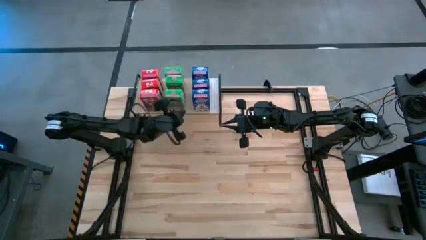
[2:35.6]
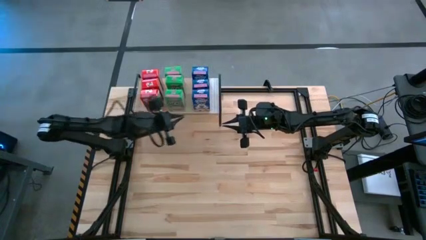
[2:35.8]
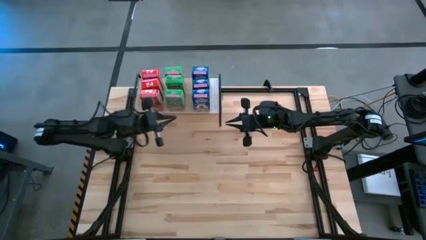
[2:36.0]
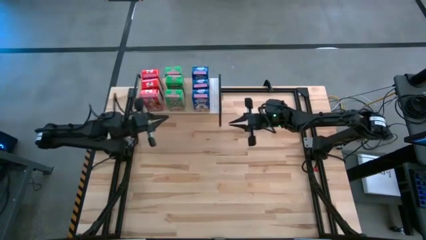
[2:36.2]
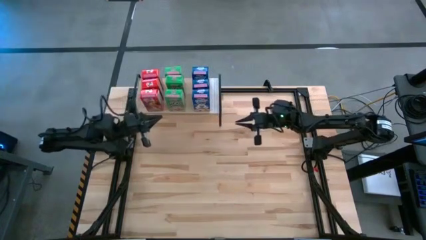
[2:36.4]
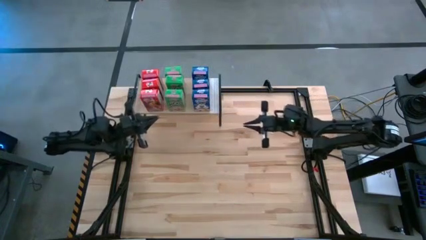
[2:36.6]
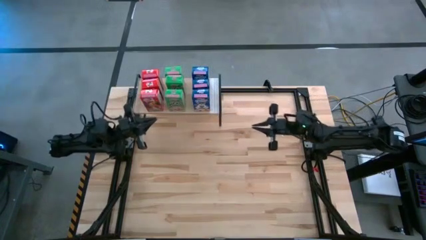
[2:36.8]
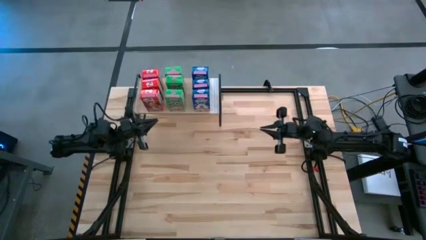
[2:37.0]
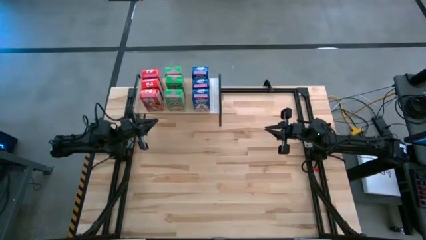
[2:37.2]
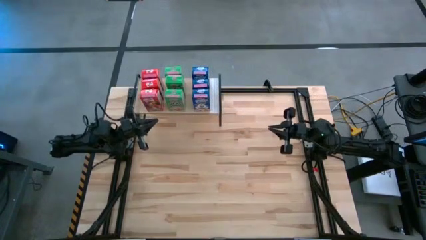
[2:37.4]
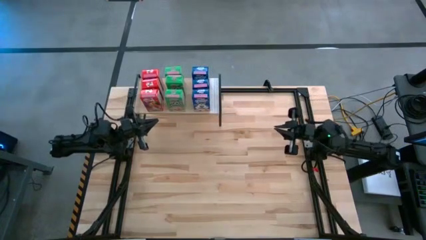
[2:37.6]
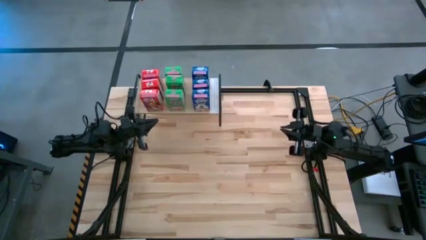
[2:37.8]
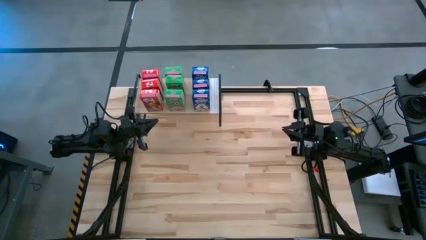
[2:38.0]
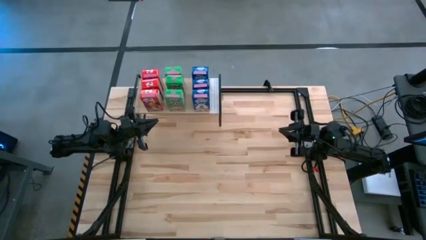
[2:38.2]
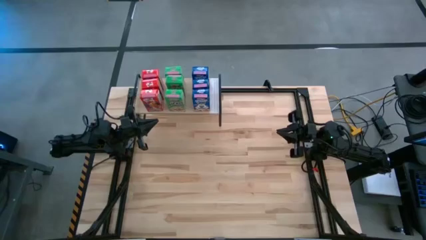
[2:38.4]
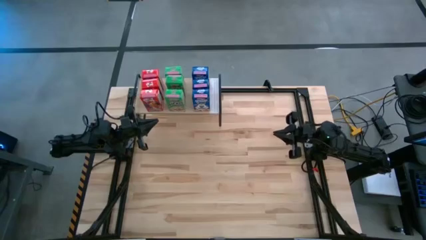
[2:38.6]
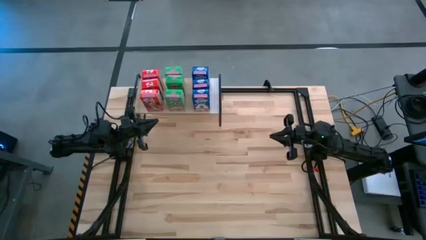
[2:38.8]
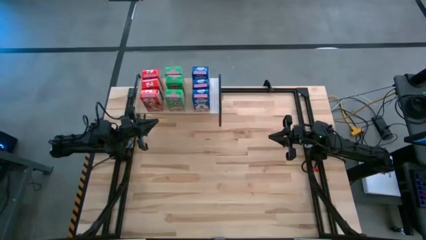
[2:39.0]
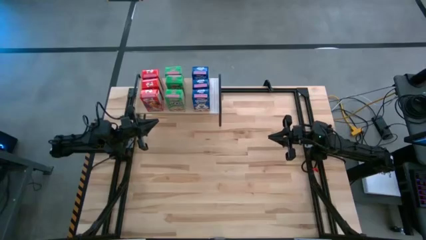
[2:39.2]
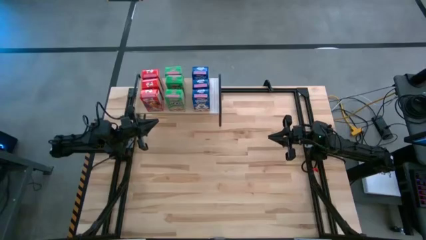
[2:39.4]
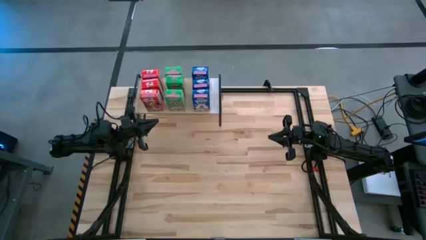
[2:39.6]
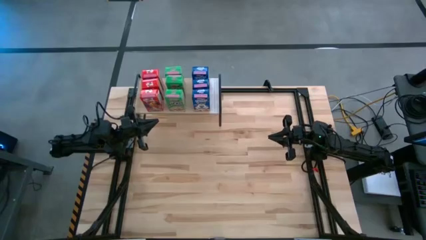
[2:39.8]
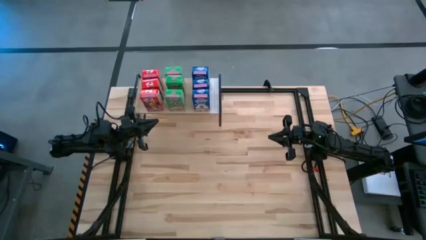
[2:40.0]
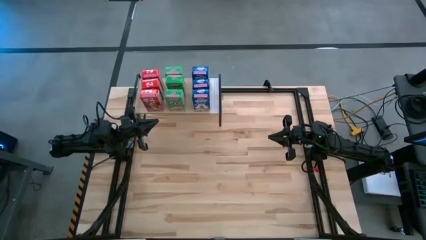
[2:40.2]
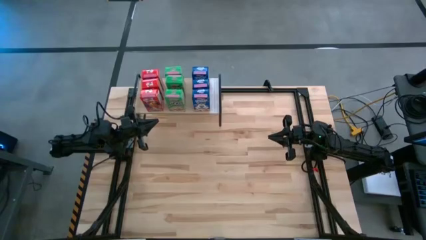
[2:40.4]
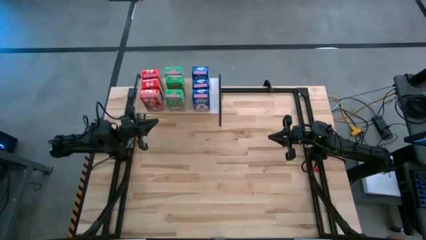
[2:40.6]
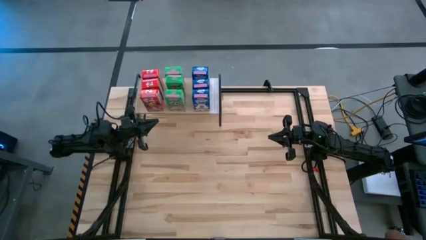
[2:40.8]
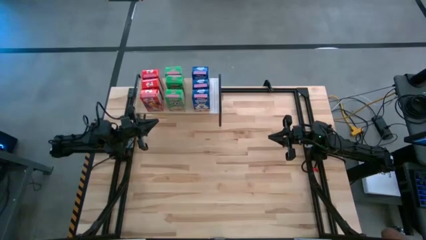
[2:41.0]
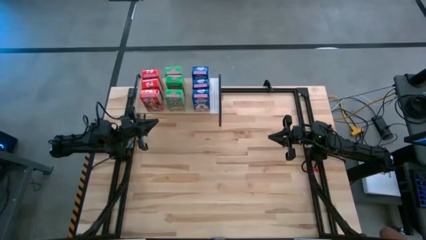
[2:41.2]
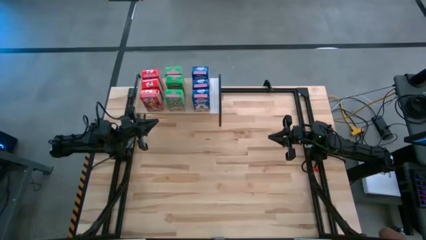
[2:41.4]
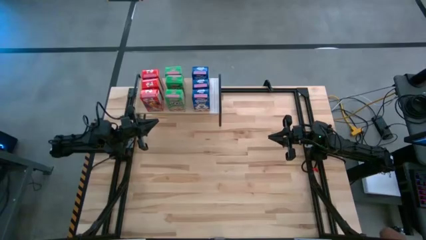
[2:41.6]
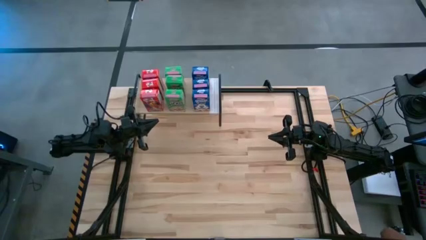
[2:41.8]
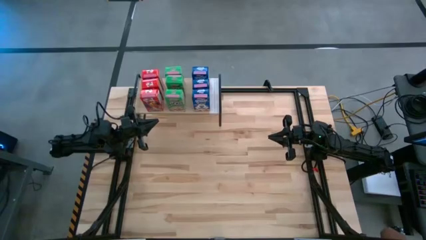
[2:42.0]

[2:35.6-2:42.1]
Task: Stack cereal on shelf
Return to Home Position

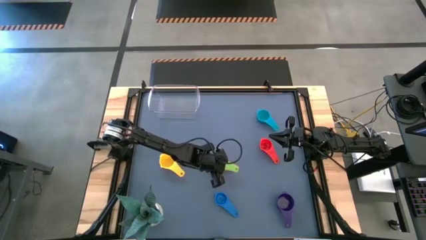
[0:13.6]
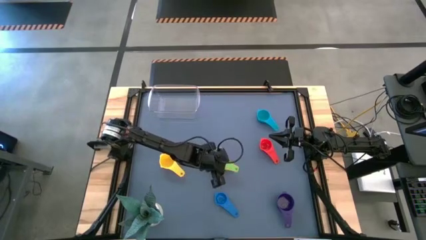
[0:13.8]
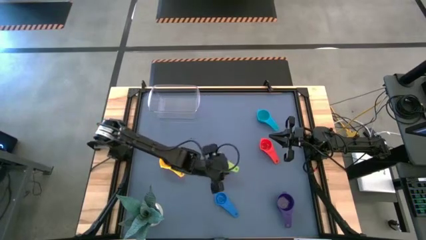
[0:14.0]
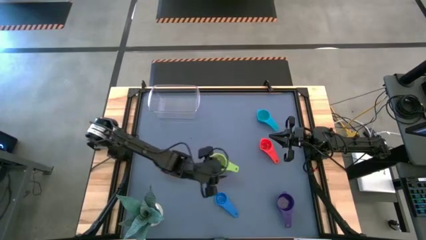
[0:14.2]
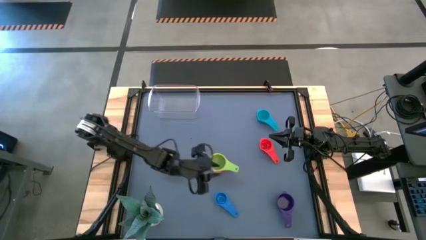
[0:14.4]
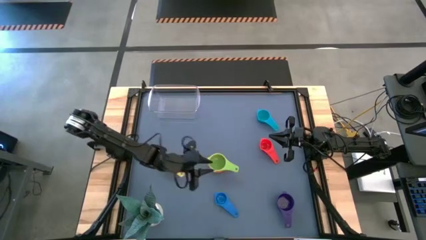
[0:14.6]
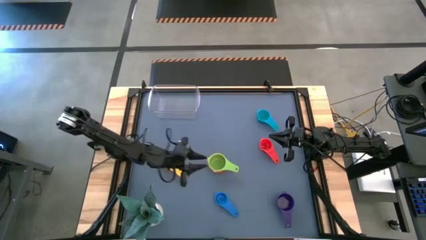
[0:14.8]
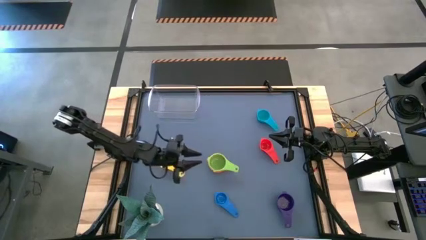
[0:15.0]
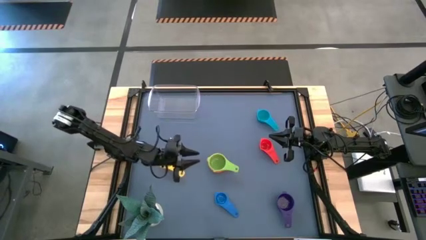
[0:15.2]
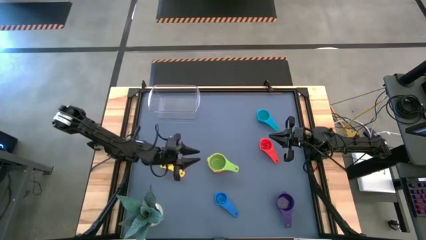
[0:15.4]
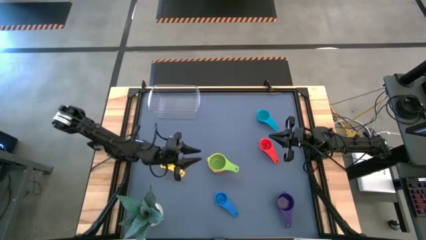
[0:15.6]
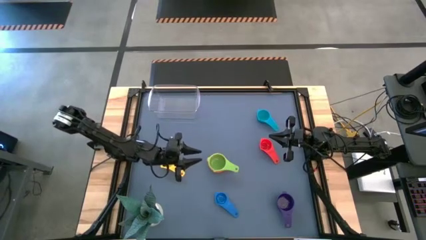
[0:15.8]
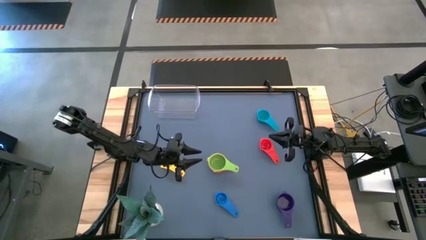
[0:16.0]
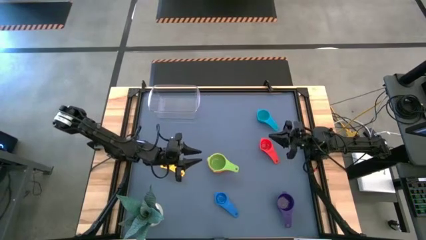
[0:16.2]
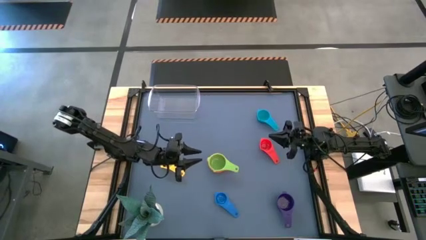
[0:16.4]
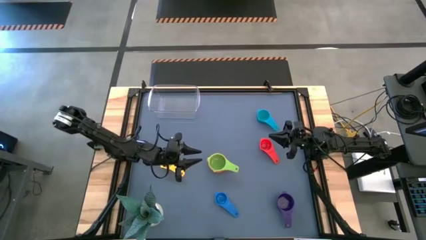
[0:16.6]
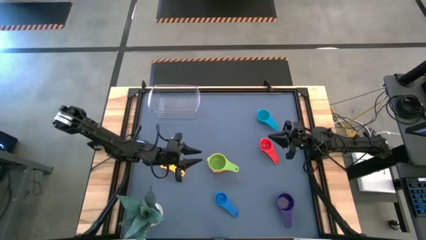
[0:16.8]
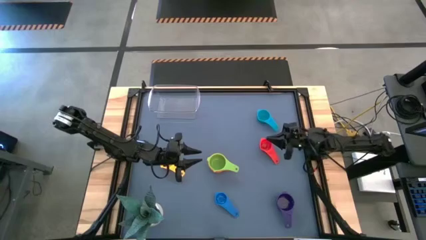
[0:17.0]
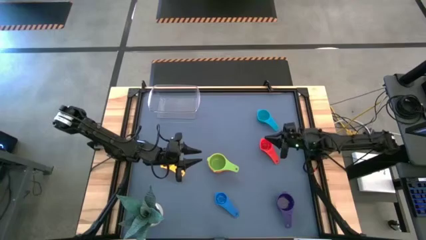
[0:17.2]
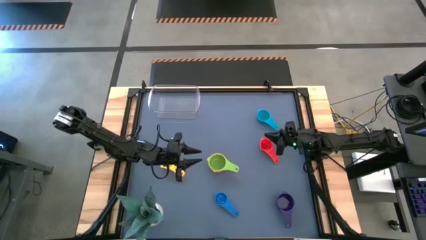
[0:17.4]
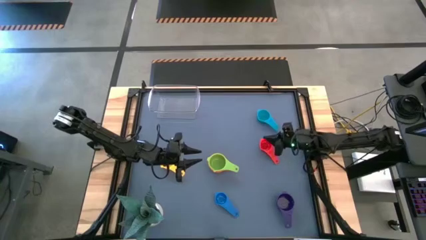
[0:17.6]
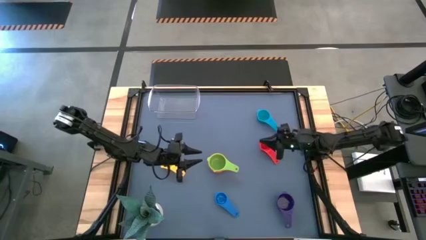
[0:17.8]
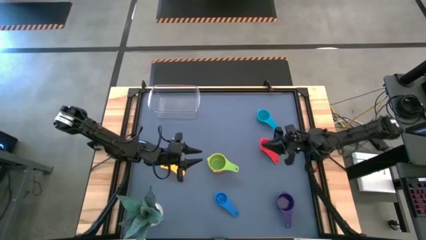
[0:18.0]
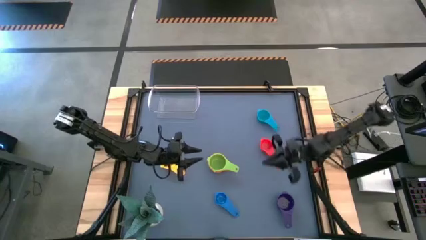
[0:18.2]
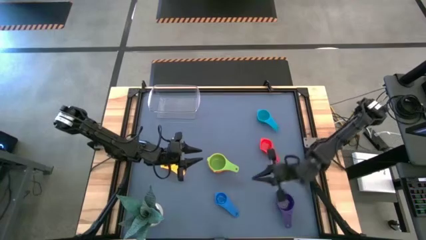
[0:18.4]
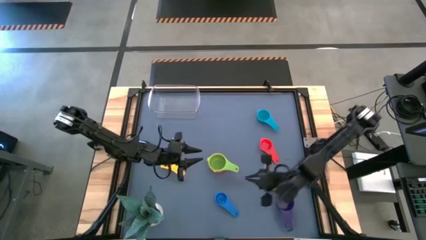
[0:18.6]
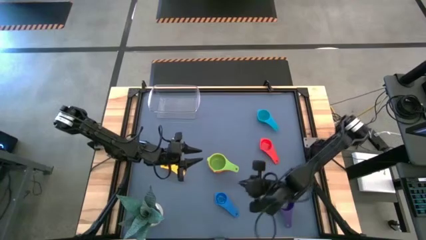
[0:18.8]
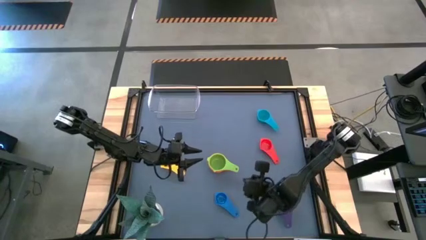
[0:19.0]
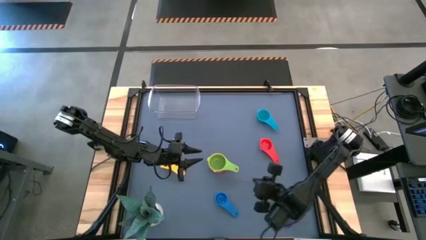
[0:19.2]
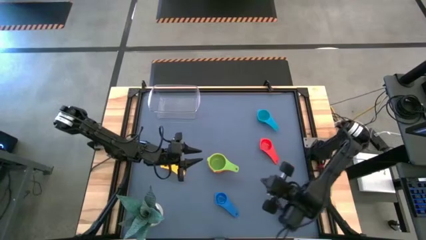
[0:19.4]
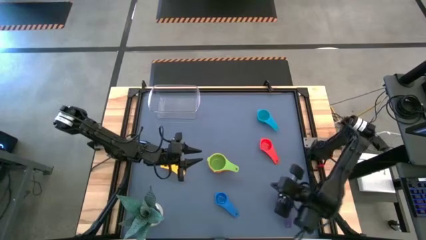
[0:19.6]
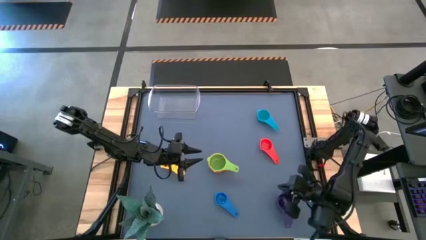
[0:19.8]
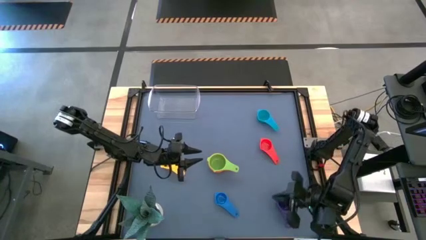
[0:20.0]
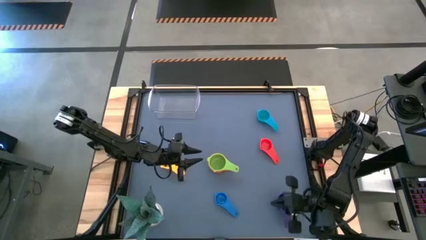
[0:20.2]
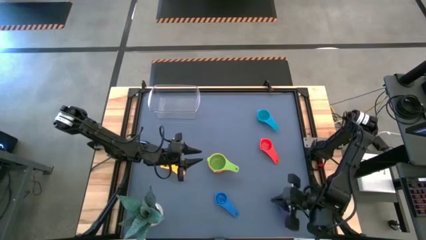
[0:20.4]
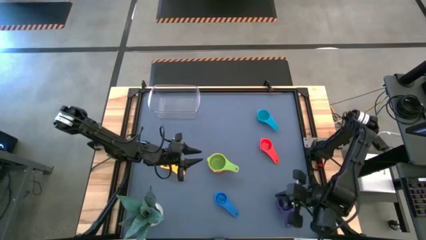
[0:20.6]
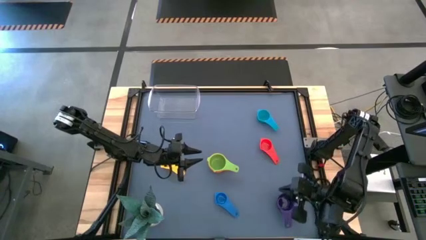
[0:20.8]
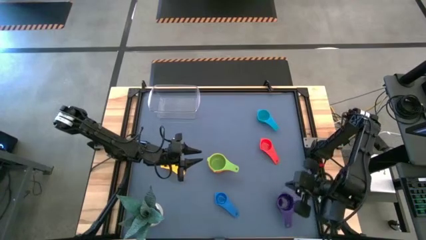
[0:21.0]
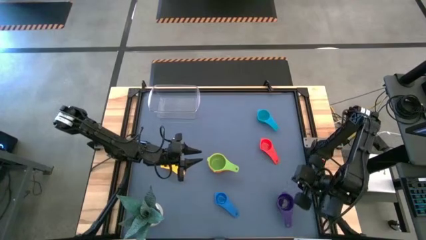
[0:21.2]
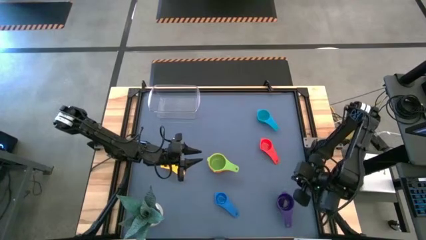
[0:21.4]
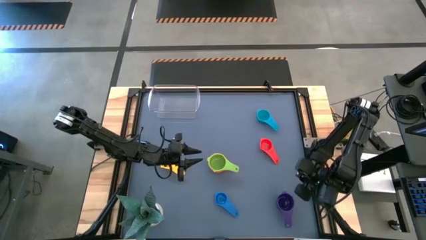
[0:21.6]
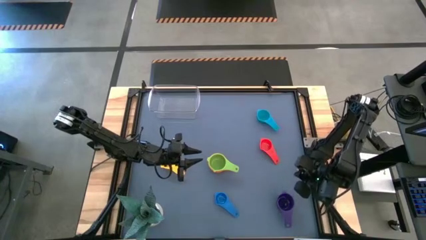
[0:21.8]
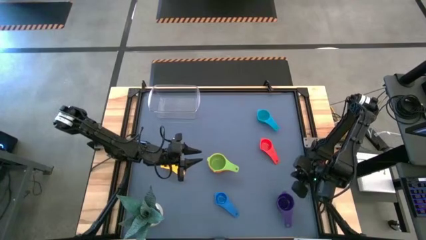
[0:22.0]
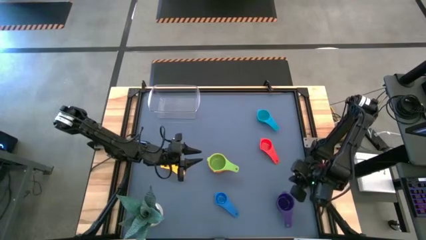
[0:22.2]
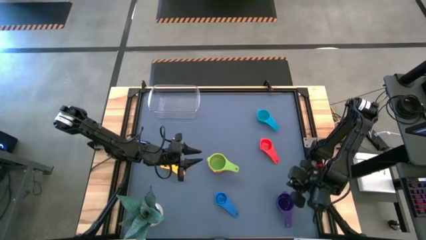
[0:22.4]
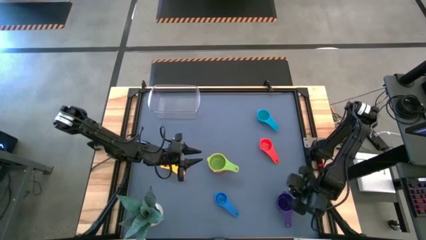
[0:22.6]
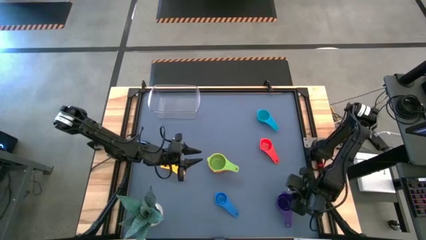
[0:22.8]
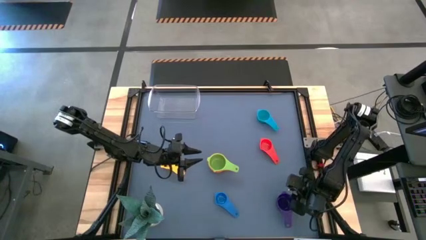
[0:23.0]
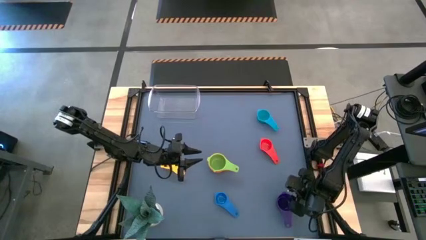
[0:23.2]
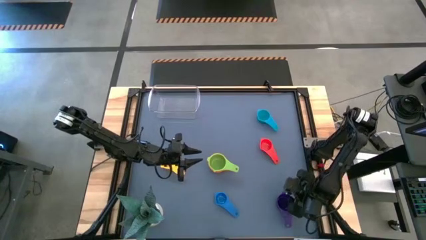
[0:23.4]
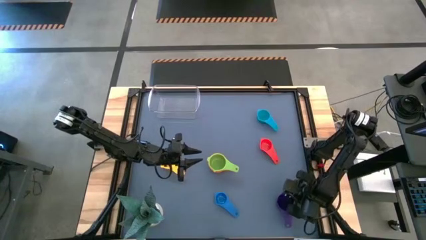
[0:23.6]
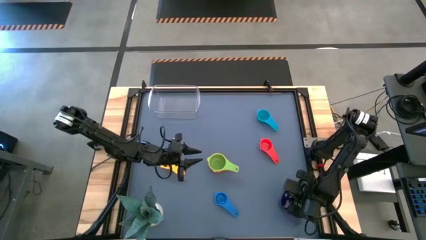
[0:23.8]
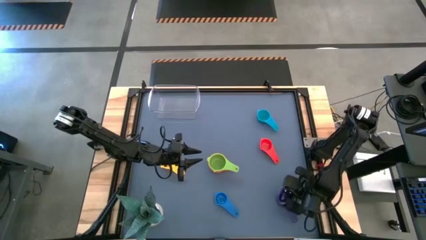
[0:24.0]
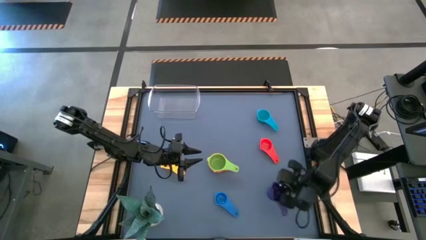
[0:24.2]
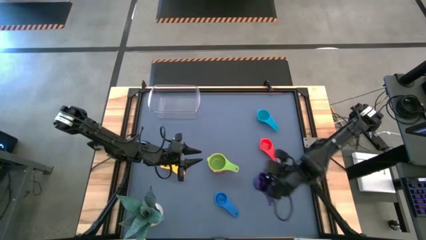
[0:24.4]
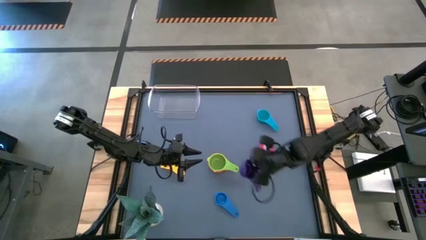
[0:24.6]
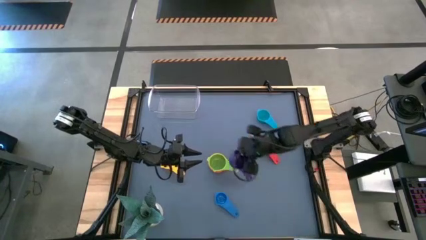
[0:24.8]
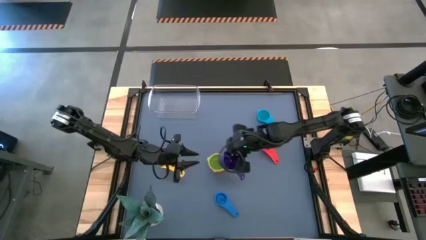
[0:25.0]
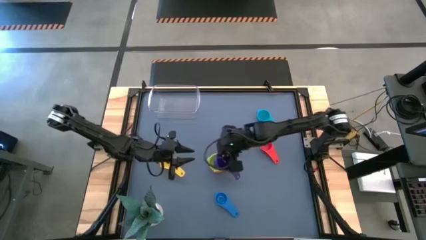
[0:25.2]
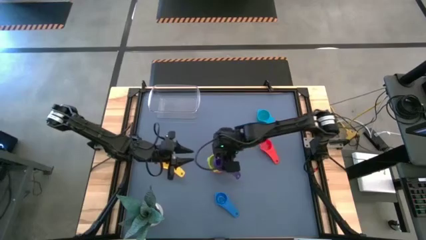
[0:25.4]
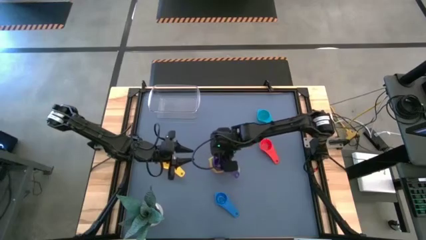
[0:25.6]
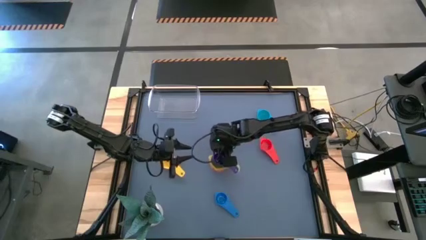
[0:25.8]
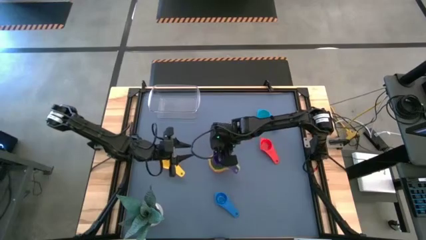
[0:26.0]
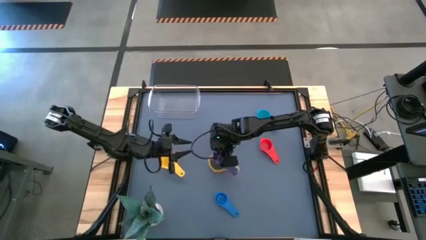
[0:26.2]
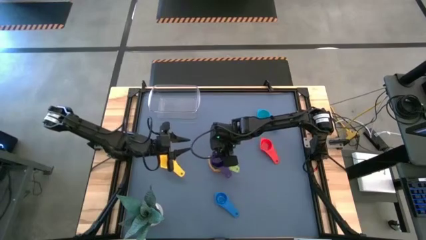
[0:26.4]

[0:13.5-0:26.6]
Task: Nest measuring cups in basket
Stack the violet measuring cup on top of the green measuring cup
